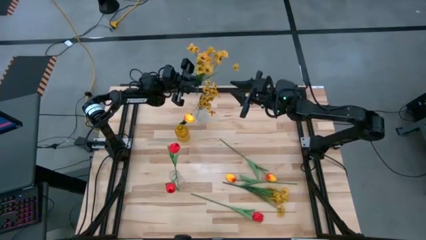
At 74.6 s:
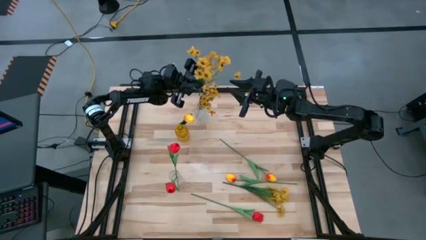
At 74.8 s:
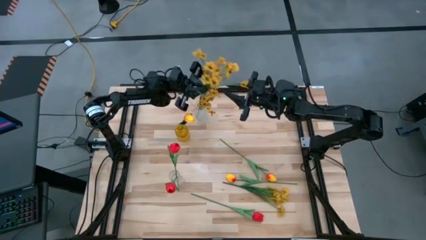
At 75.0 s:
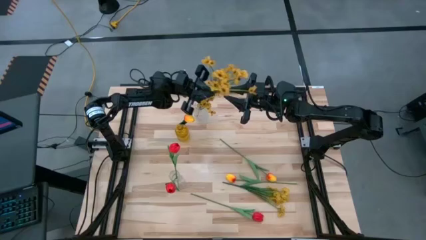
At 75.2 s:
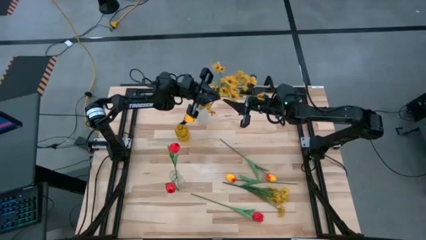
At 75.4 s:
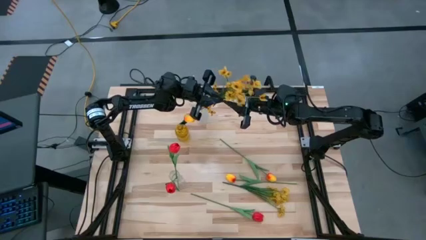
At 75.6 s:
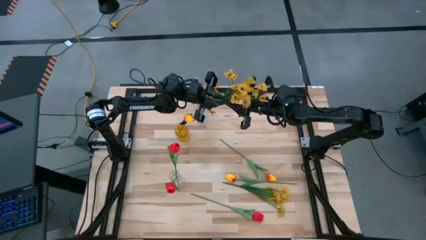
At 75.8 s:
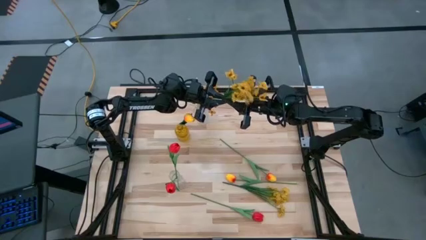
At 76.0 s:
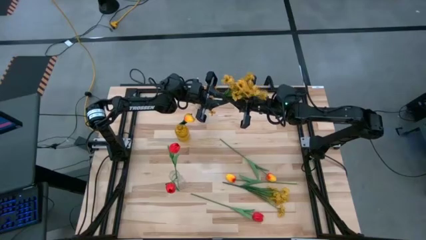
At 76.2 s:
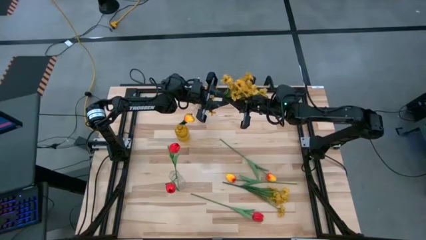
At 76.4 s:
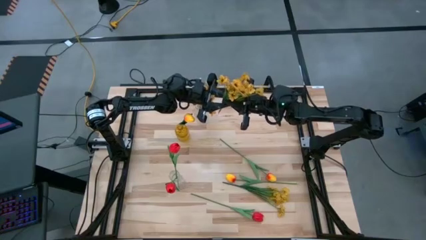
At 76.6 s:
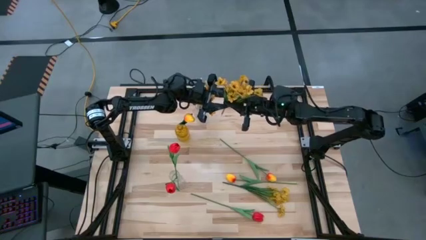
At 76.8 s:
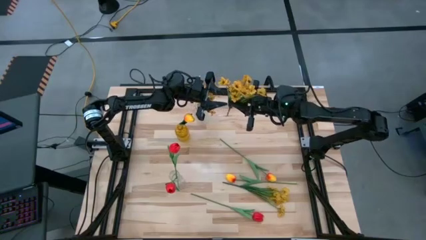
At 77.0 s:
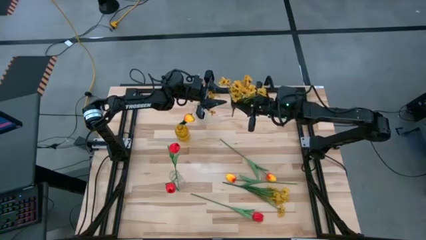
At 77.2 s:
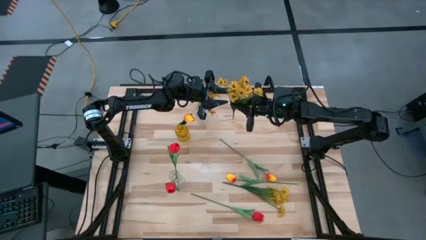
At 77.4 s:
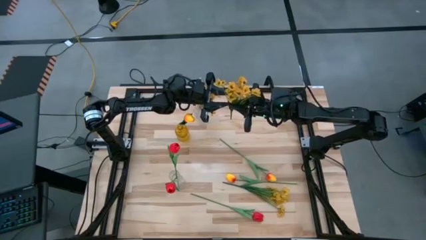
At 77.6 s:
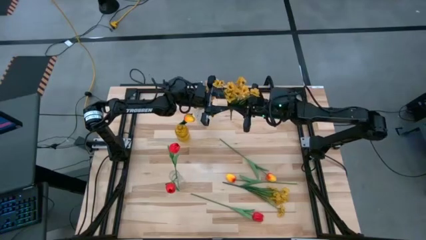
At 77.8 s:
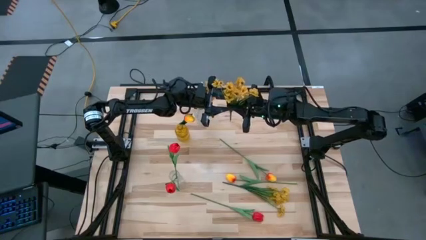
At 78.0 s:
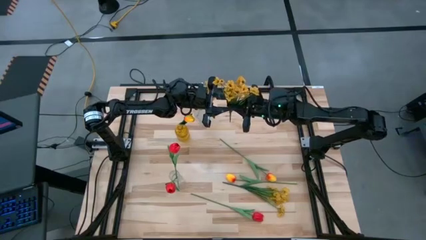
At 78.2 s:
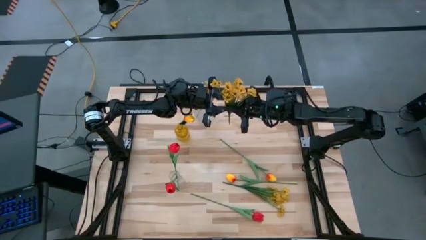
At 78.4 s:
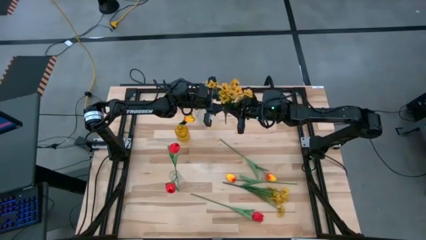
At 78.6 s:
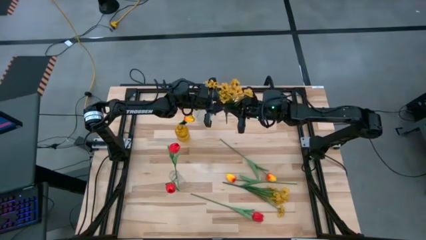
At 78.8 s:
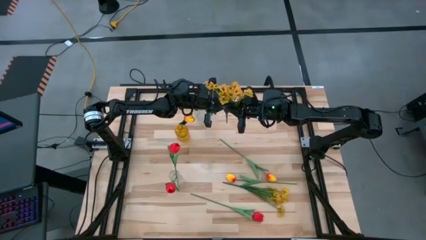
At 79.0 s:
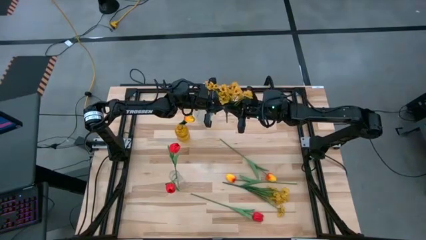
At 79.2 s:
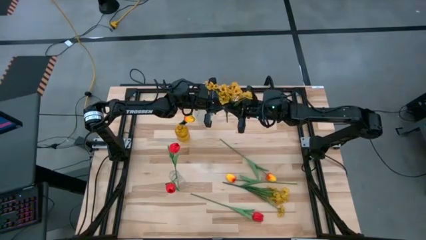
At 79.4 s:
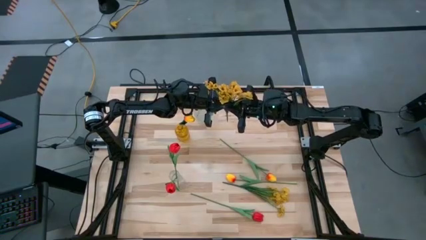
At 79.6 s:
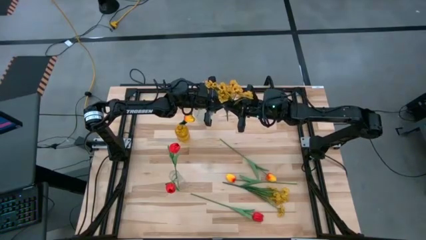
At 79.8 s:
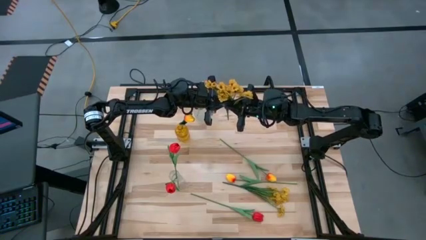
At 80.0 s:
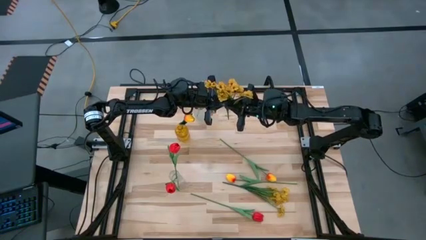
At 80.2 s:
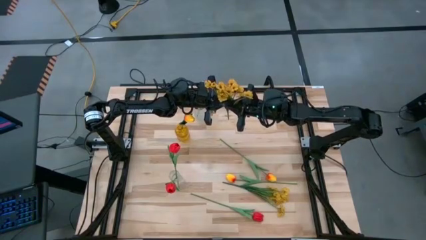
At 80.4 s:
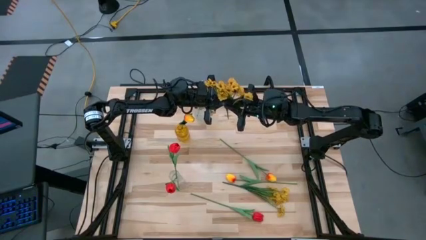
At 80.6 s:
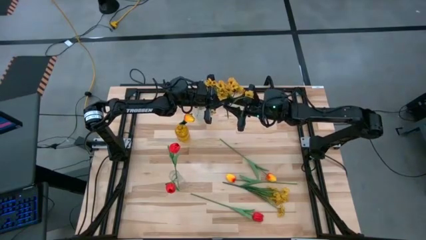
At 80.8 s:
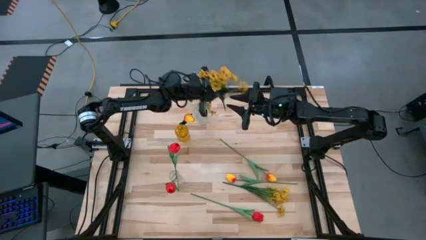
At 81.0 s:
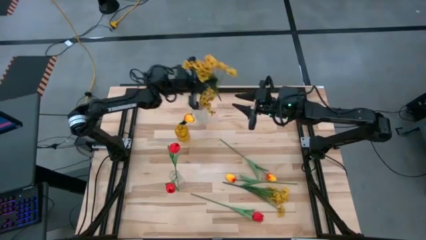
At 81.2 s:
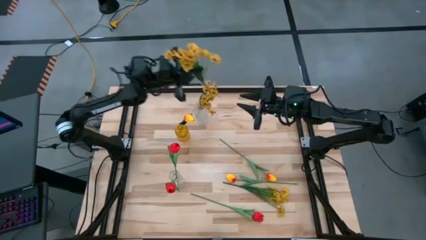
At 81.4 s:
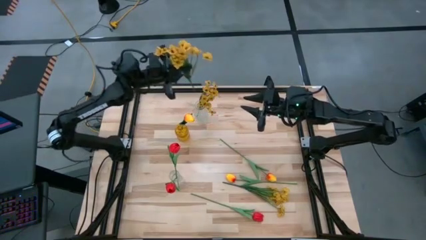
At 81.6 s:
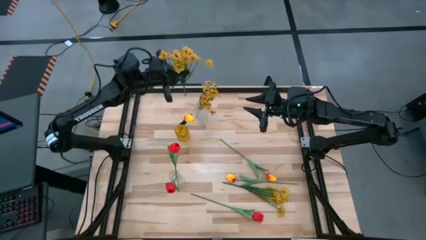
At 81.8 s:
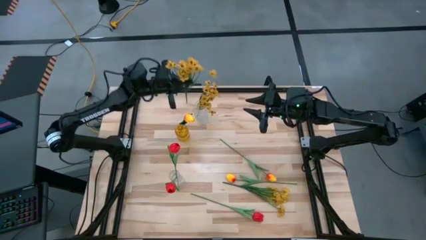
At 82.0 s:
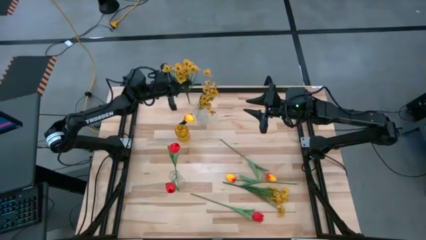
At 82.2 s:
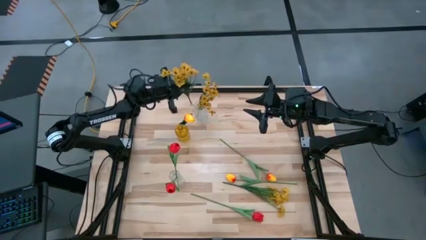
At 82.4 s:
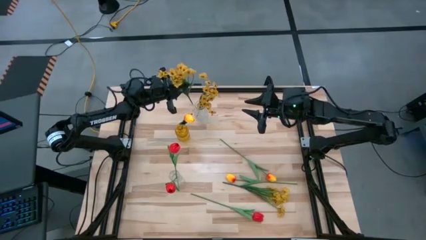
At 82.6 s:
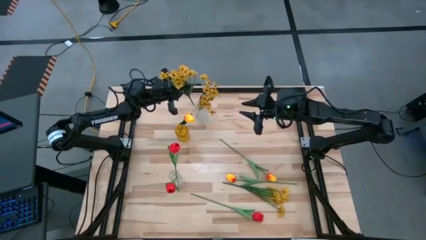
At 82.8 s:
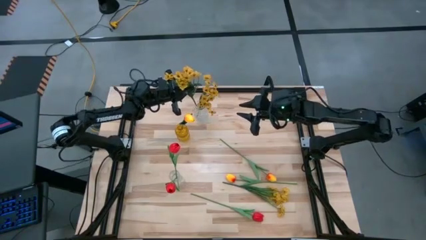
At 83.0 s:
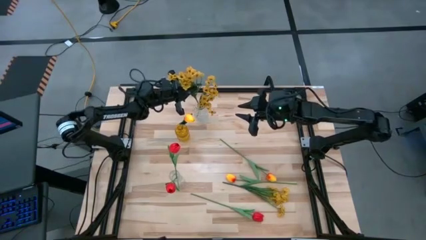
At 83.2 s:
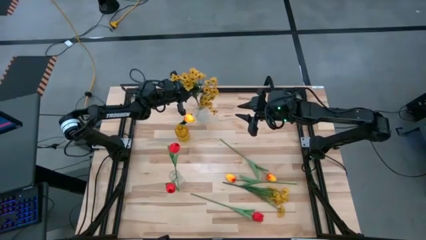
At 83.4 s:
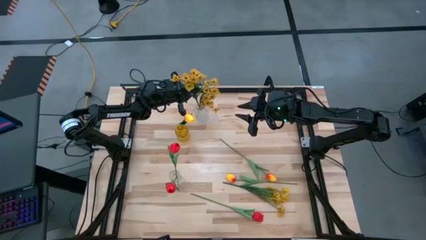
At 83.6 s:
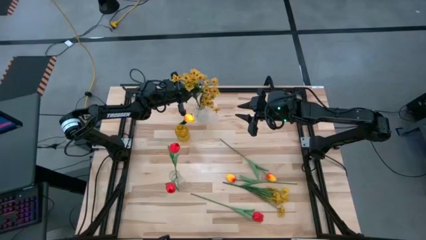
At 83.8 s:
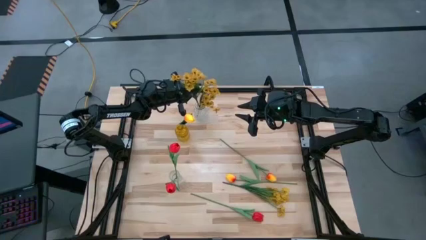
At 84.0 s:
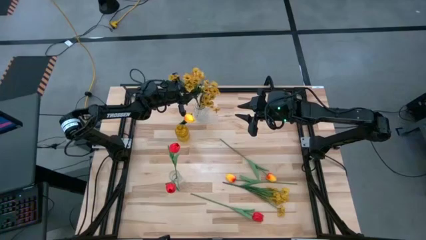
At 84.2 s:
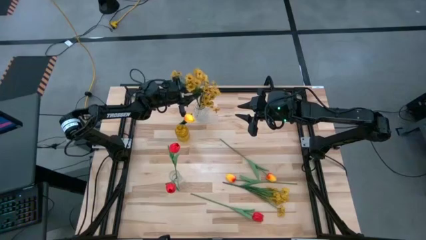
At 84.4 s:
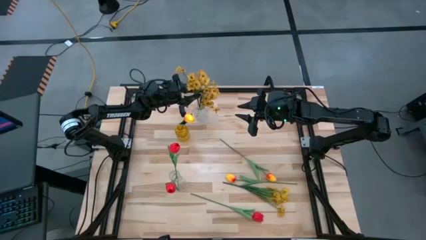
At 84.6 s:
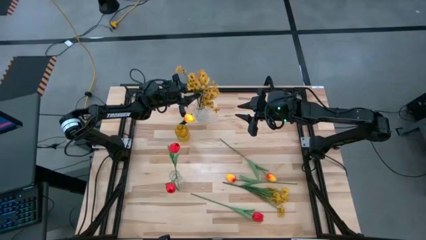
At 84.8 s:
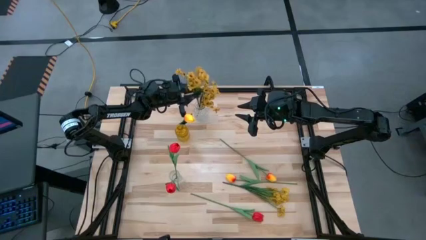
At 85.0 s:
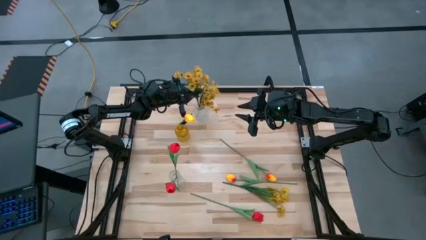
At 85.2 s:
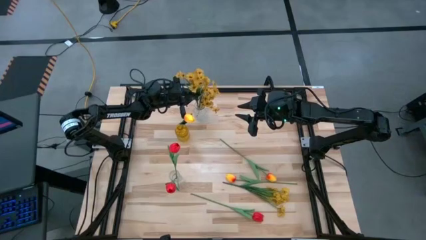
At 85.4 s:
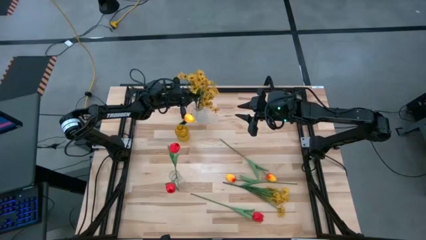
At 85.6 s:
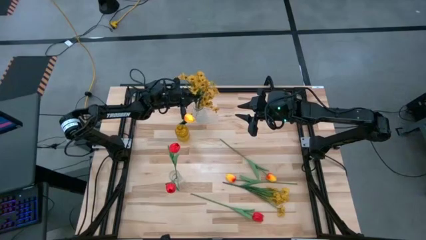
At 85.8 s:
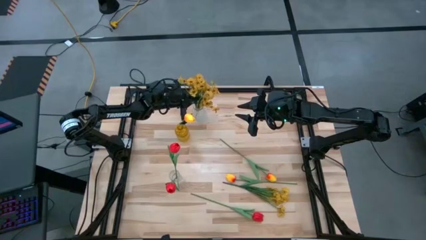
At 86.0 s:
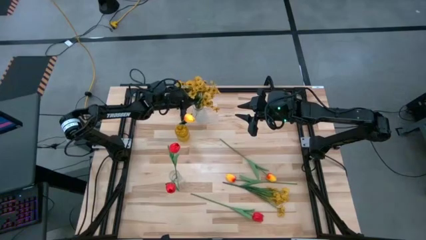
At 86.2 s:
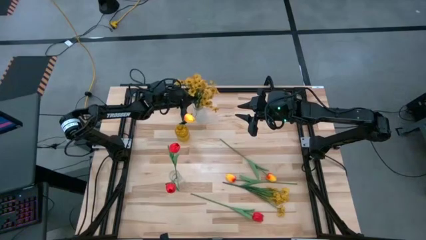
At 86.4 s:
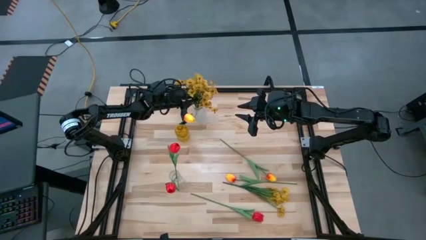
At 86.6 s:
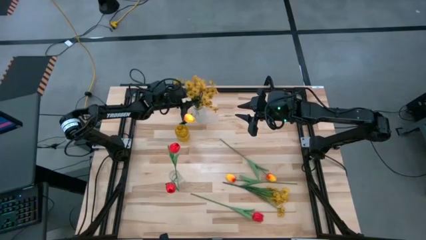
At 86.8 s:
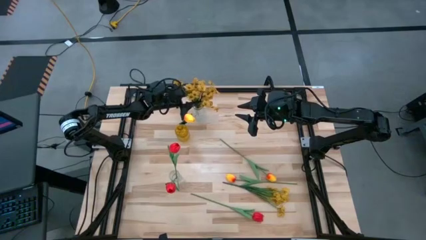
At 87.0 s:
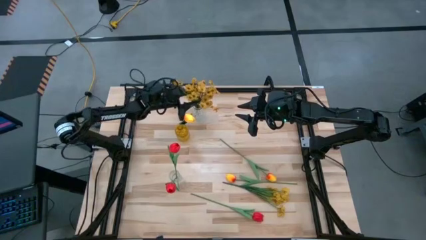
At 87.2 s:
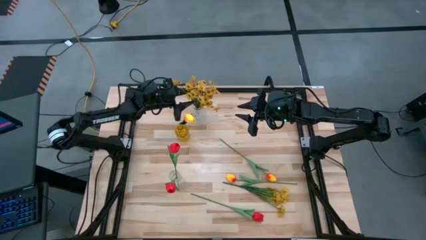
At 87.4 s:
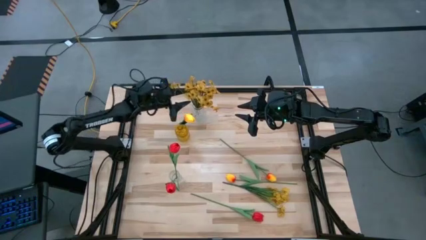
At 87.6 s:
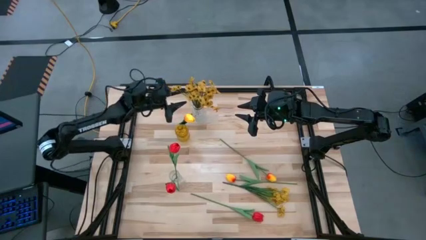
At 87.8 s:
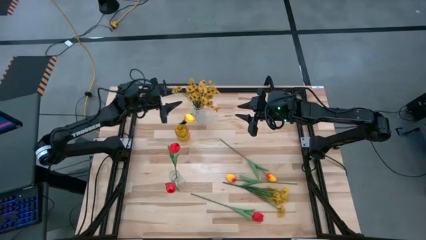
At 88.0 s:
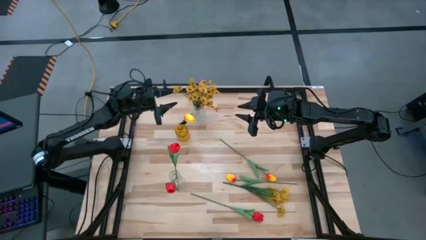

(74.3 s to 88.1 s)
Task: Sort flowers into vase by color
Put the top yellow flowers into the top transparent vase

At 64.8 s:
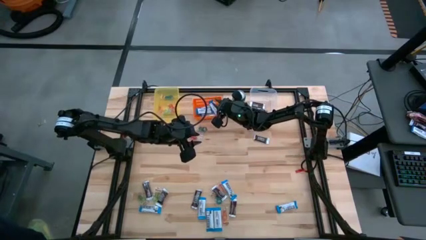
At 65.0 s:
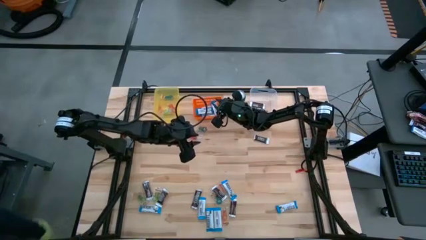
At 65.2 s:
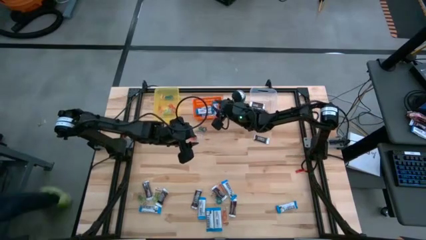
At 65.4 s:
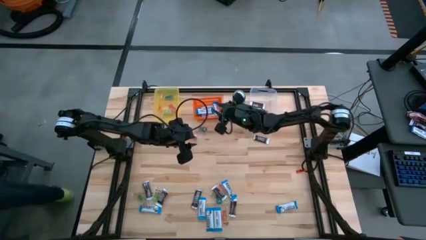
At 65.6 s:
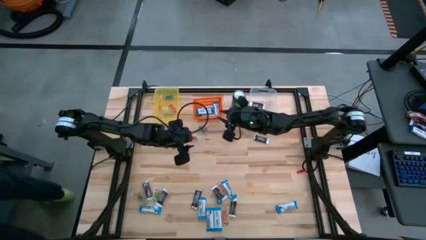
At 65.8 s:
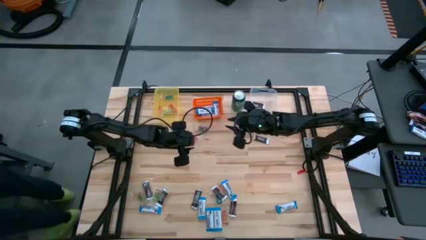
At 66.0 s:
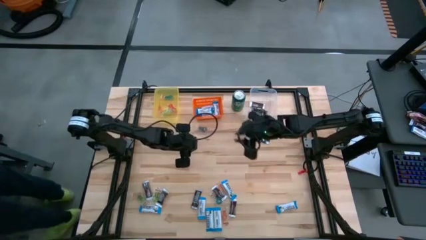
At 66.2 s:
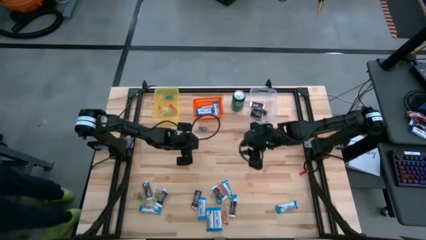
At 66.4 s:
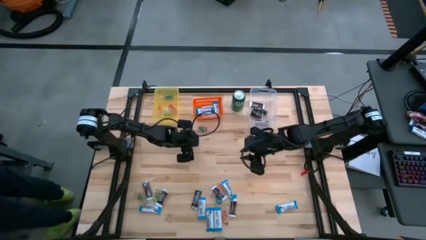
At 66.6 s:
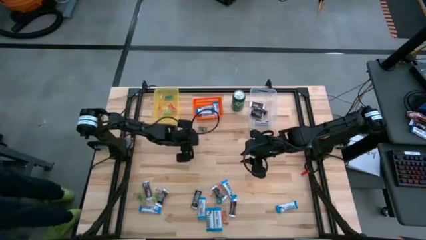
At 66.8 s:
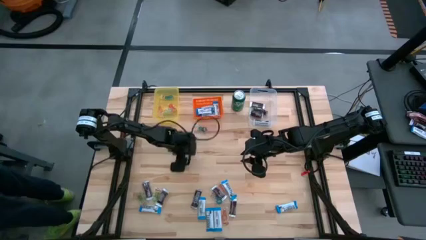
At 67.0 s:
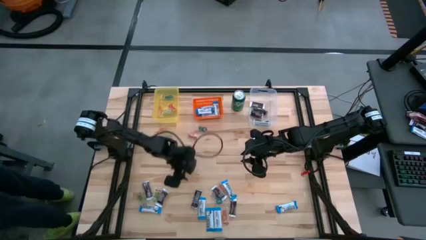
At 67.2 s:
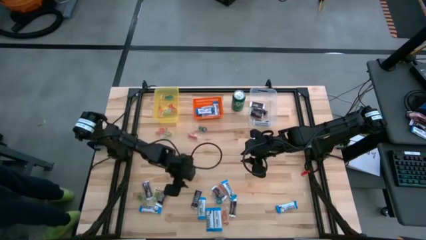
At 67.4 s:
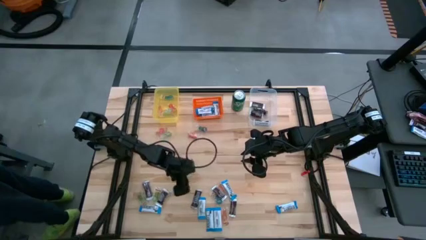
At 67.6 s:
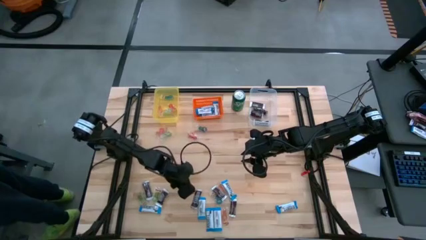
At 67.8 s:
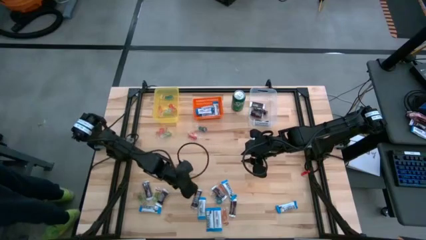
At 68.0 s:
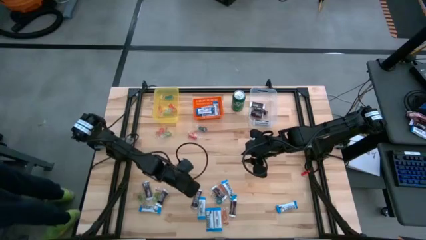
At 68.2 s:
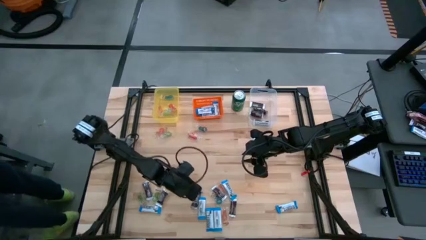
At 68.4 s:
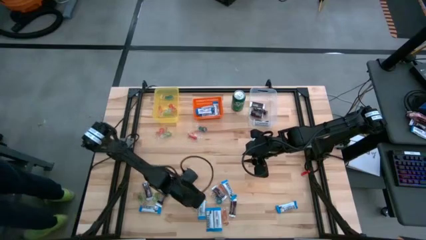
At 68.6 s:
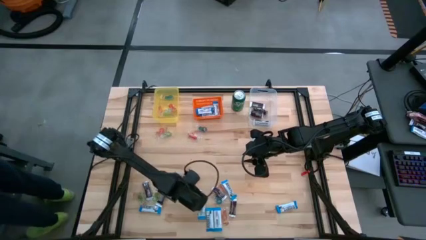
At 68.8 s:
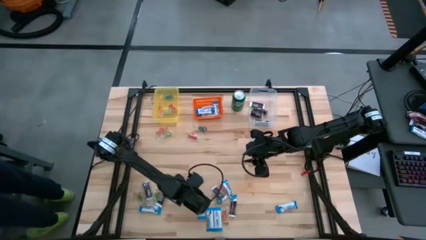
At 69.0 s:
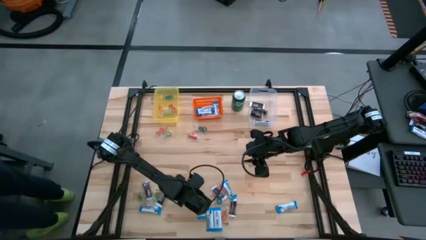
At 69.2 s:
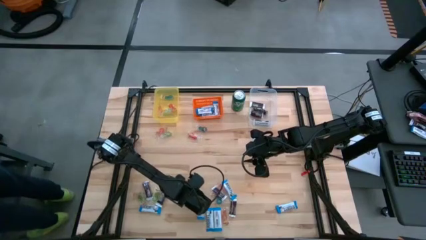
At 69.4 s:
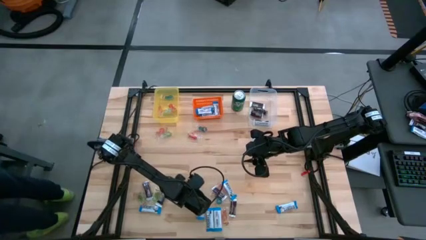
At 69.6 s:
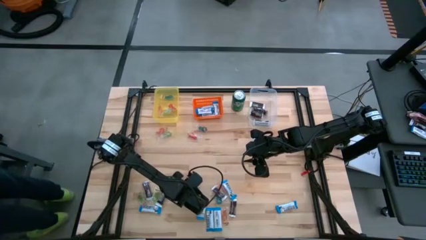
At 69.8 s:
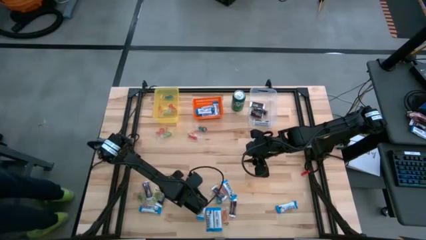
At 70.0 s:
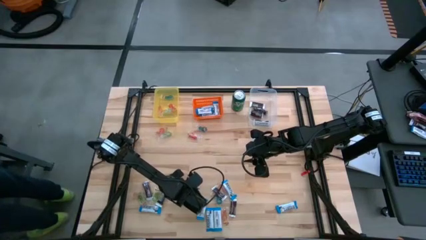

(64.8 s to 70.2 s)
Task: Organize candy in baskets
Put the brown chocolate into the transparent bin
